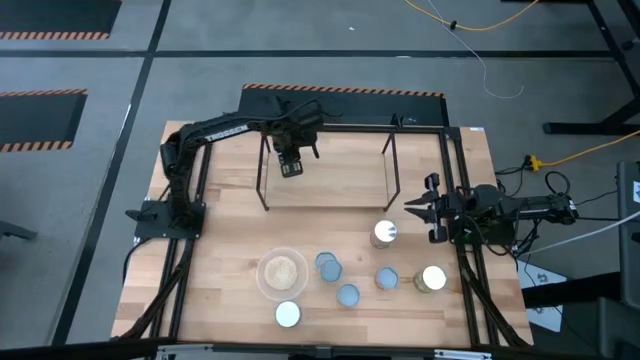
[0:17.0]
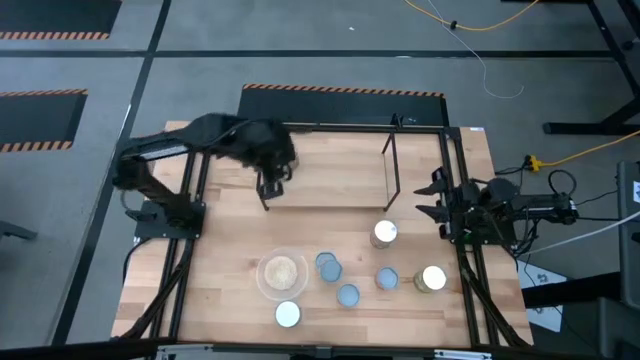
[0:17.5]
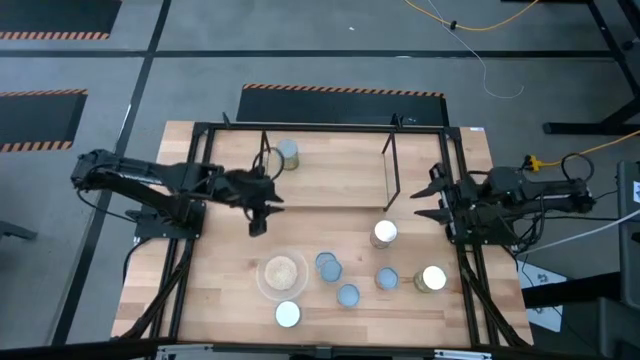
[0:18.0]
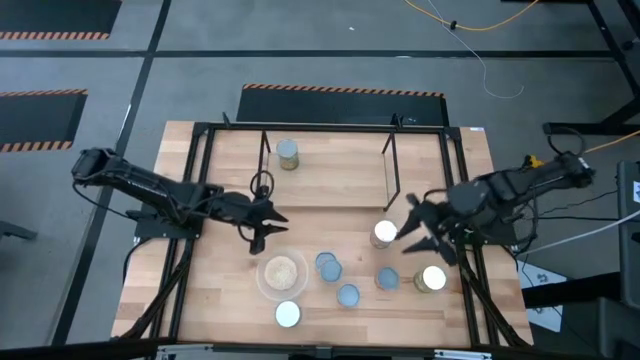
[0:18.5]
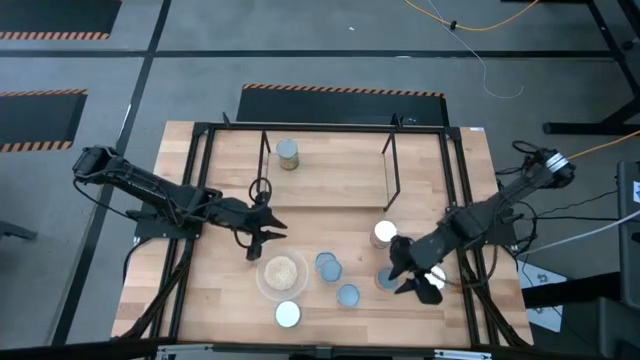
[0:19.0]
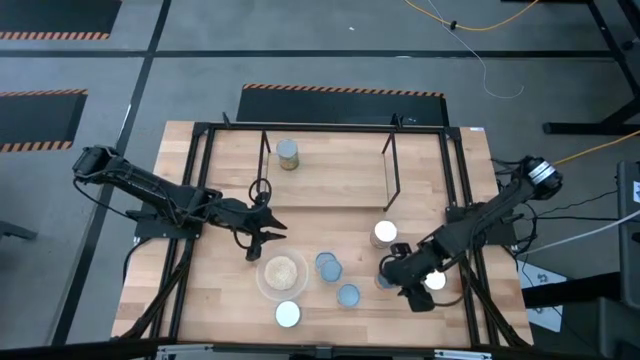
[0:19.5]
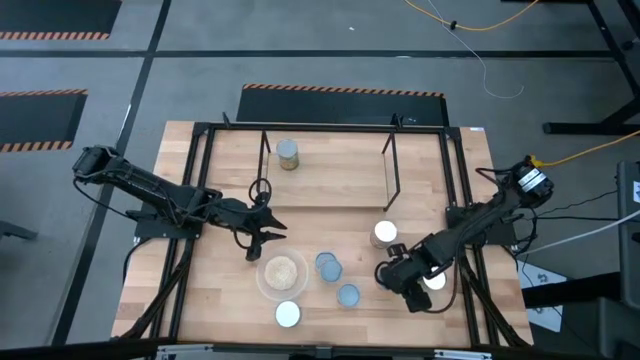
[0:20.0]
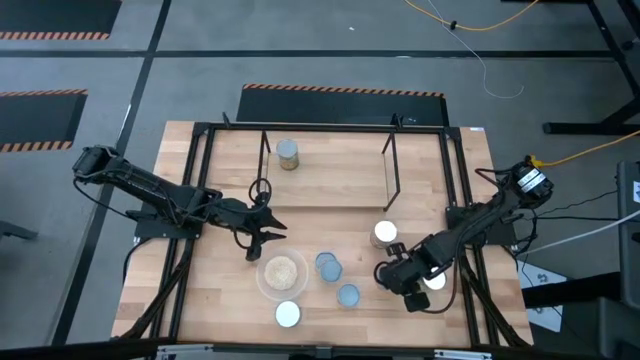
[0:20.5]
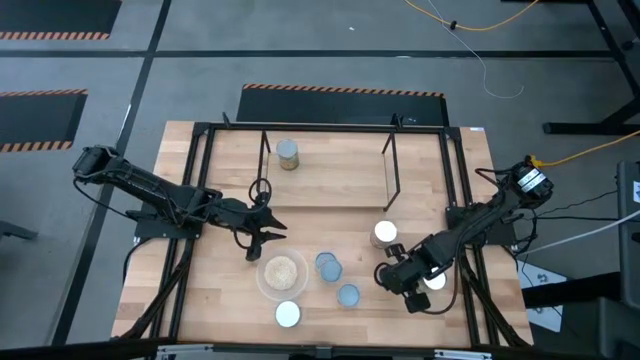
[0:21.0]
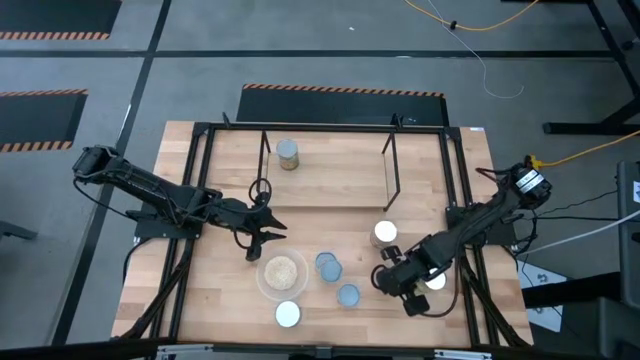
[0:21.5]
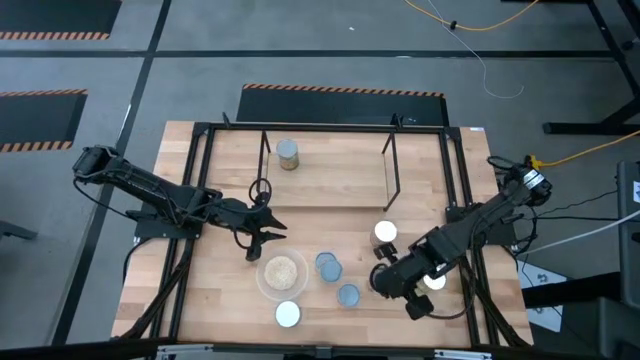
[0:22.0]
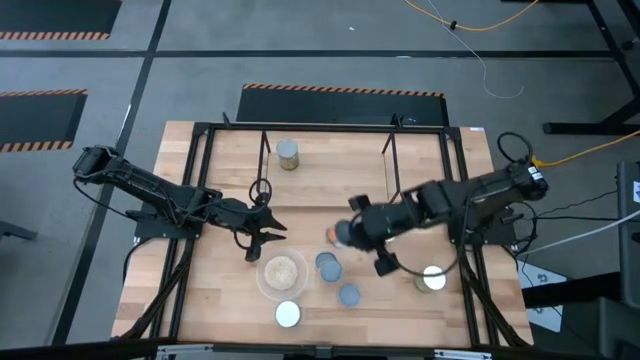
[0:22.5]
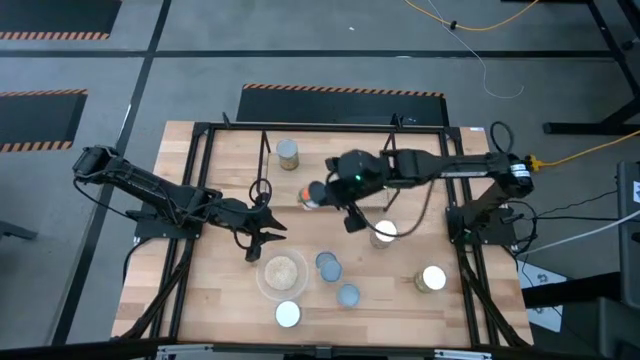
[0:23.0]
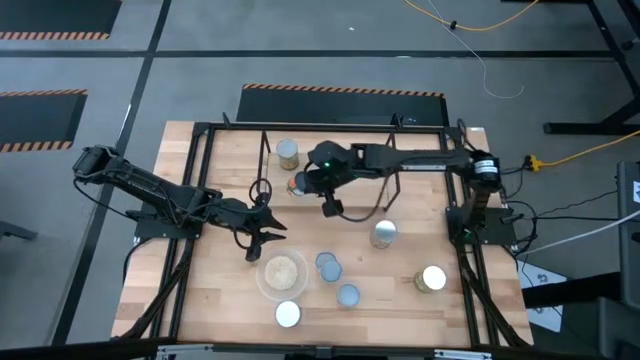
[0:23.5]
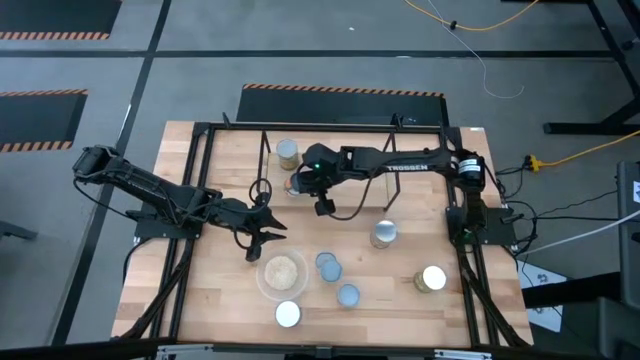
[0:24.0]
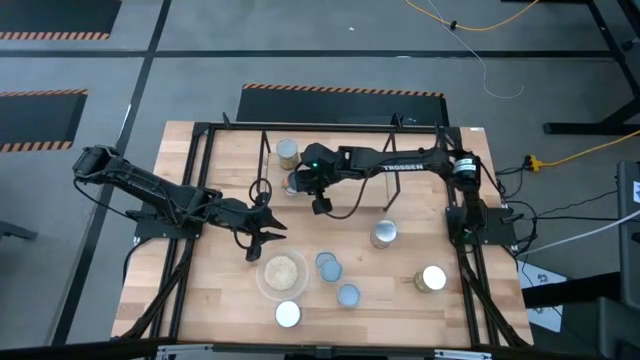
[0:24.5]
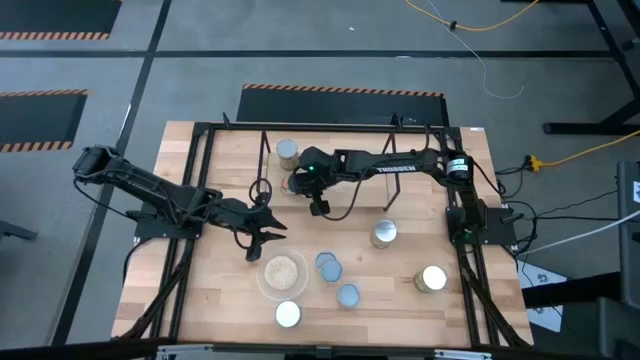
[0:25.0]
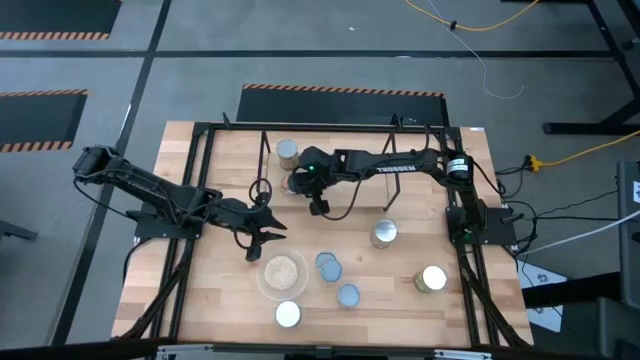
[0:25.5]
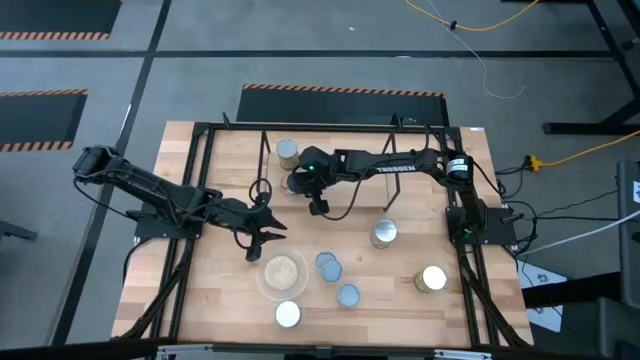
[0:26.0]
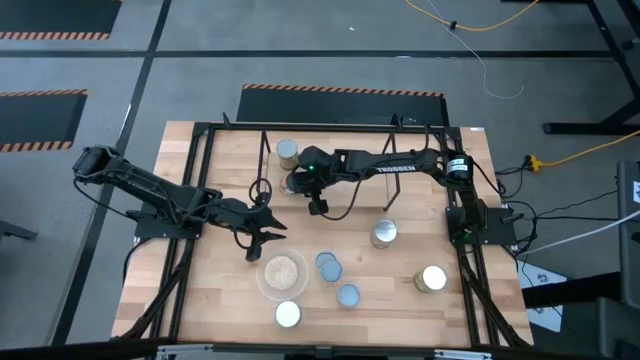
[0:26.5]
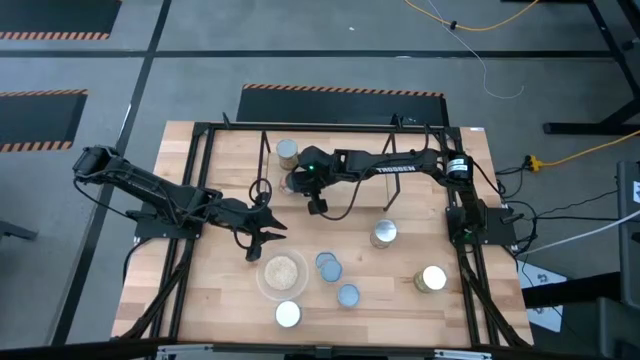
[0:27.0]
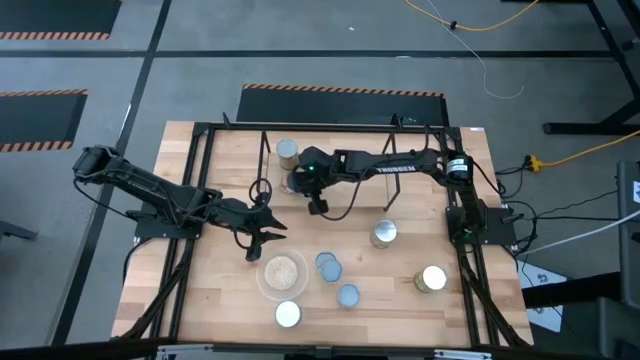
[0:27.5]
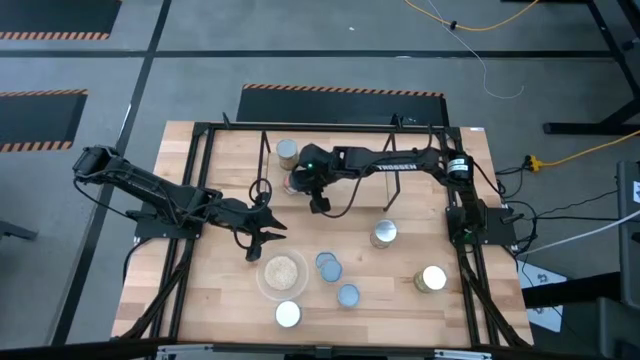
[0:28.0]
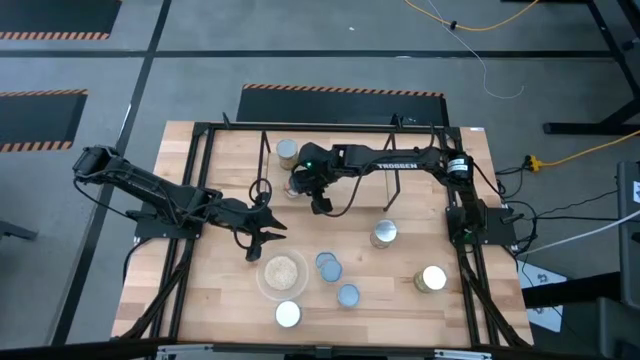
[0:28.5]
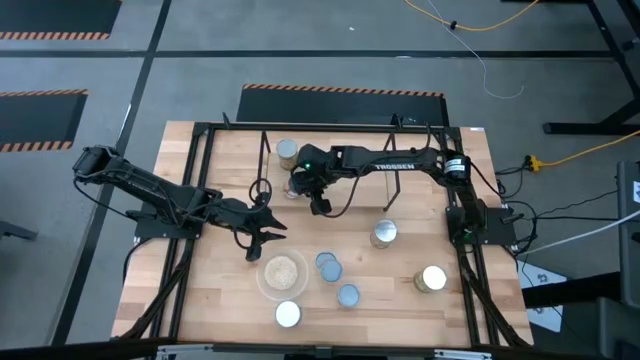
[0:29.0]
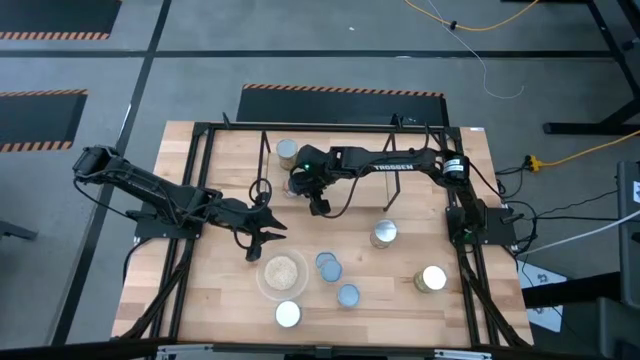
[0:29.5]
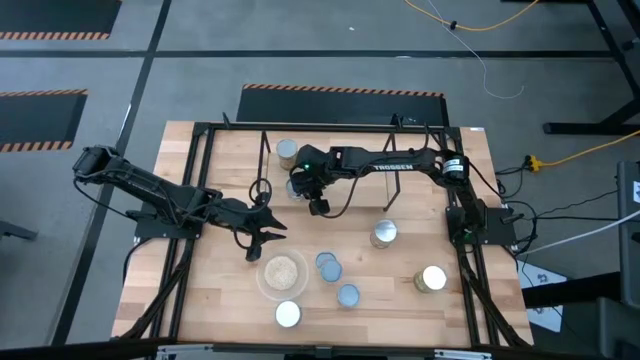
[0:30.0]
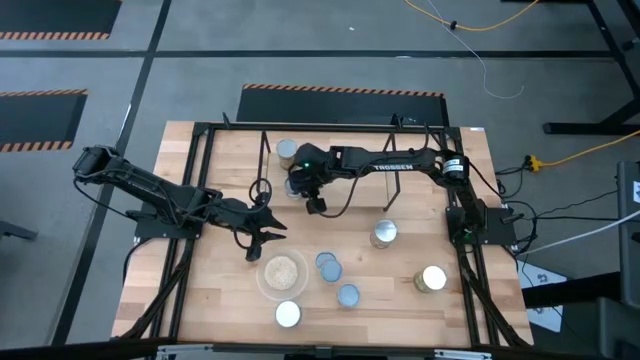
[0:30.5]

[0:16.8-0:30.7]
Task: Pick and place cans onto a shelf
Put the canned orange on the shelf

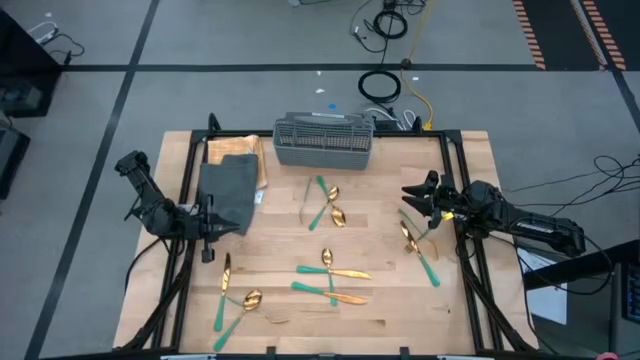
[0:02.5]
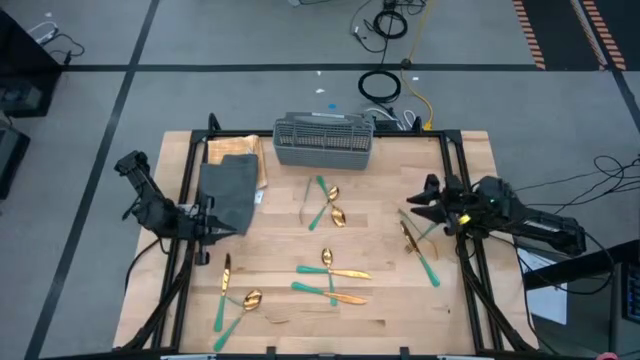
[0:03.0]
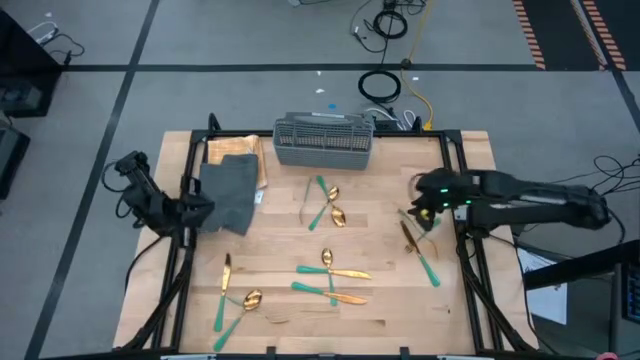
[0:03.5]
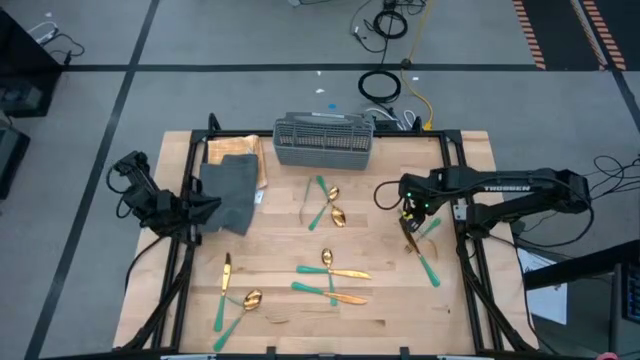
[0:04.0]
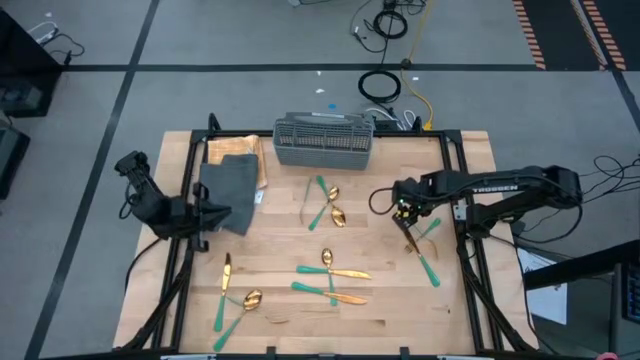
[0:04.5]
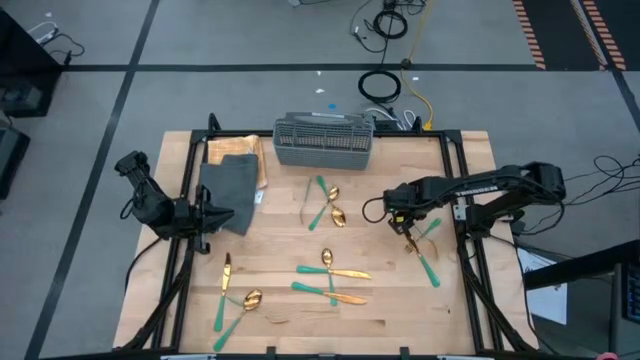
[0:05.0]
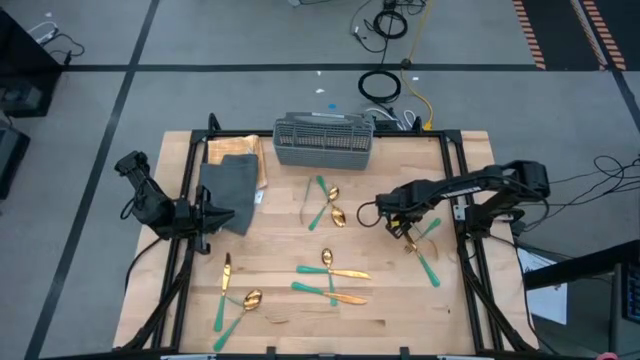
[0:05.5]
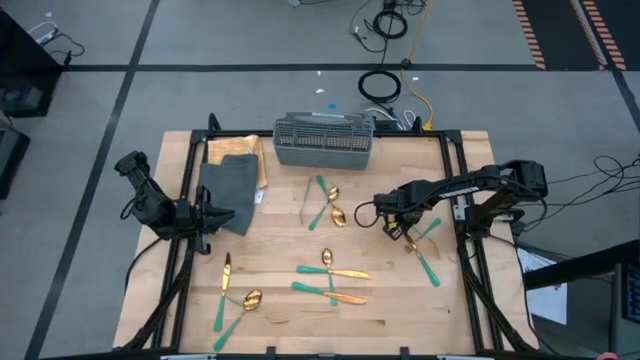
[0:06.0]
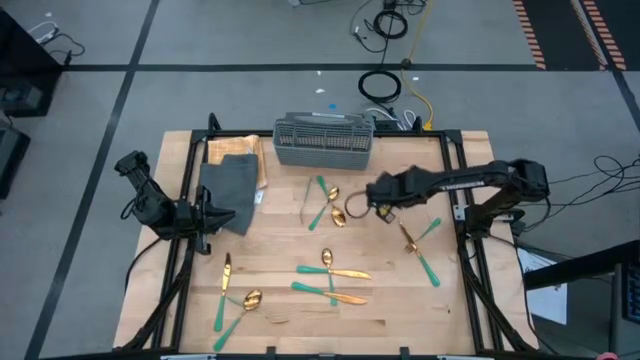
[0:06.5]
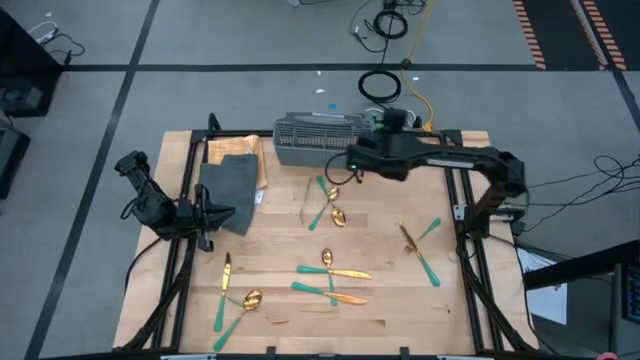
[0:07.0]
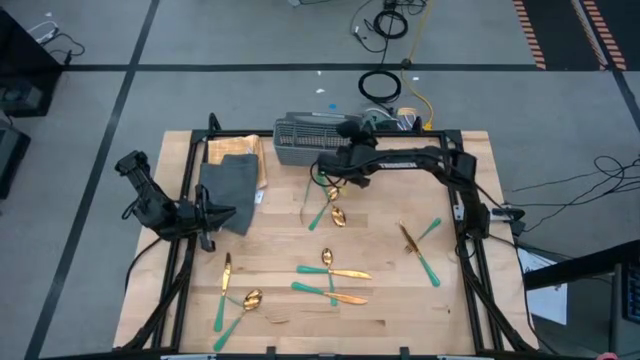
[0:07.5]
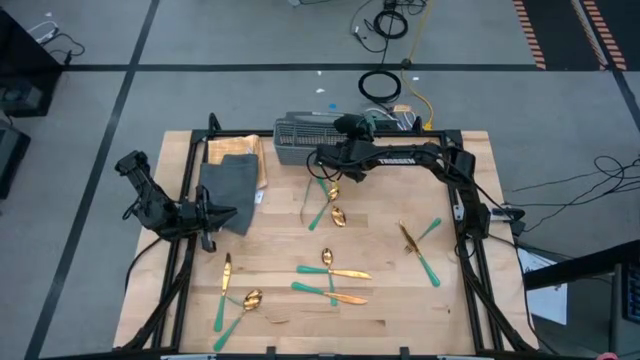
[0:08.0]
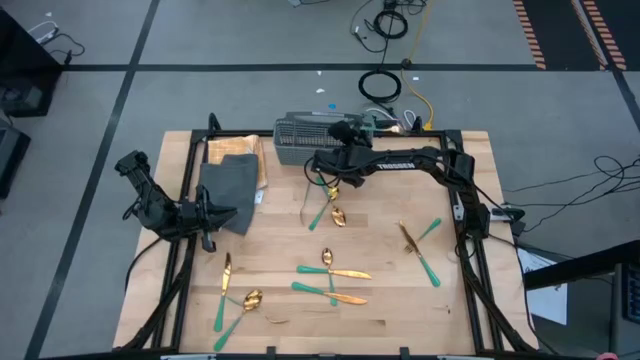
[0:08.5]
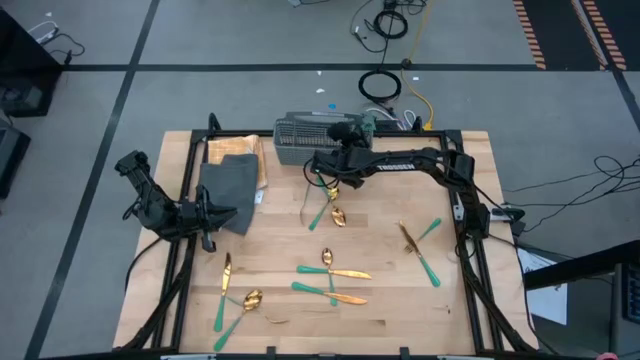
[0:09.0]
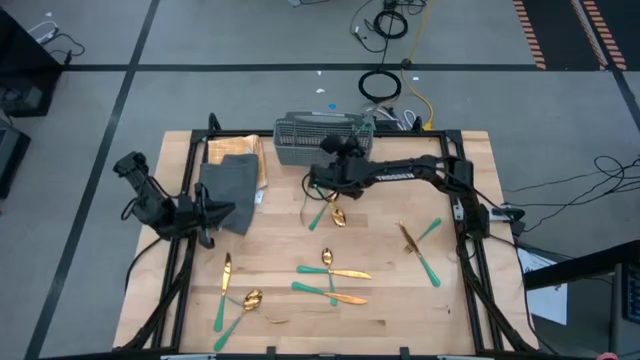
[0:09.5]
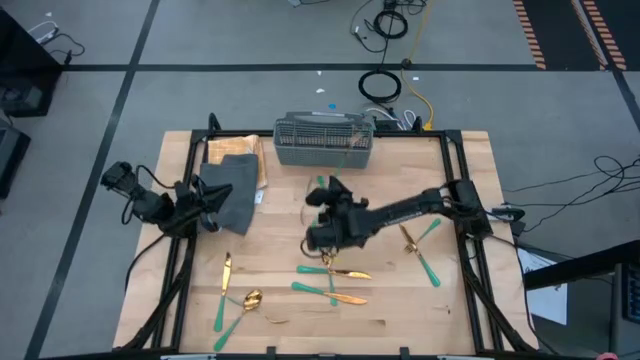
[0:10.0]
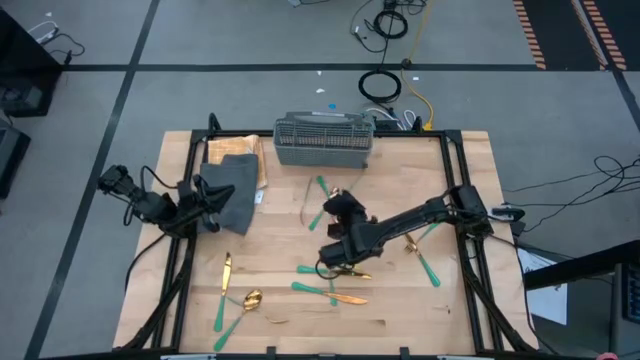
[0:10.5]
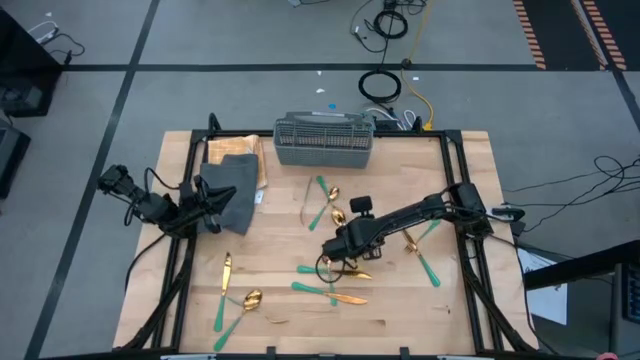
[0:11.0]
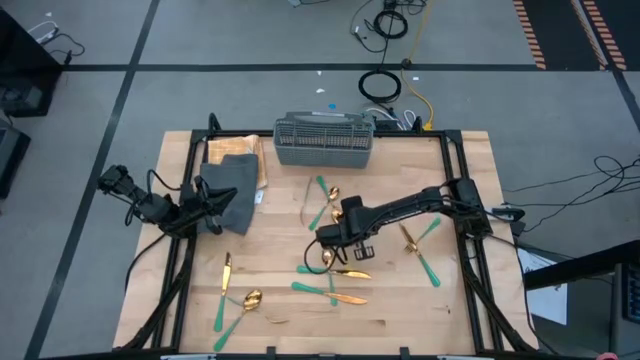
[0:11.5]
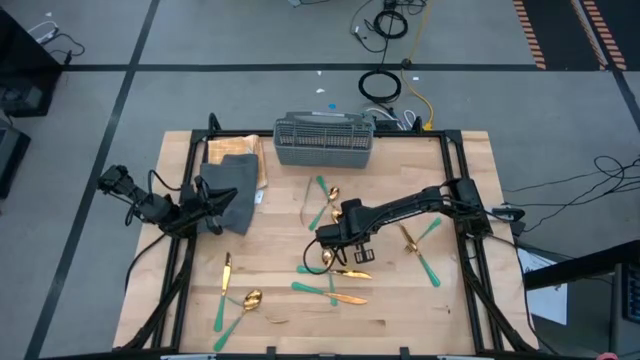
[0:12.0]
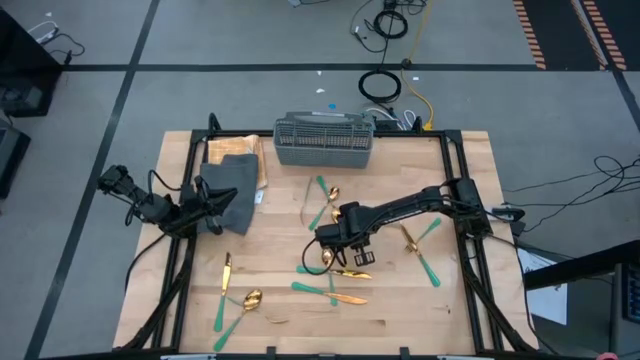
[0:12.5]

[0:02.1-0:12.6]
Task: Sort silverware
Put the green fork into the silverware basket
